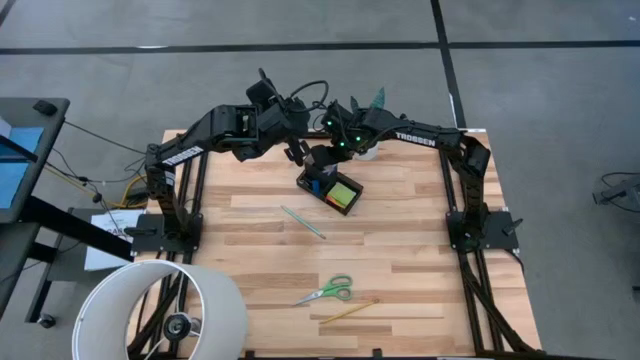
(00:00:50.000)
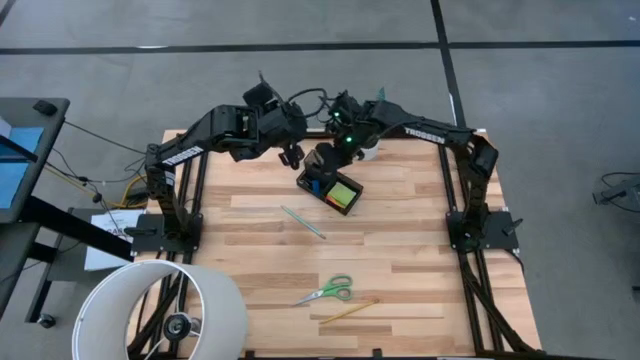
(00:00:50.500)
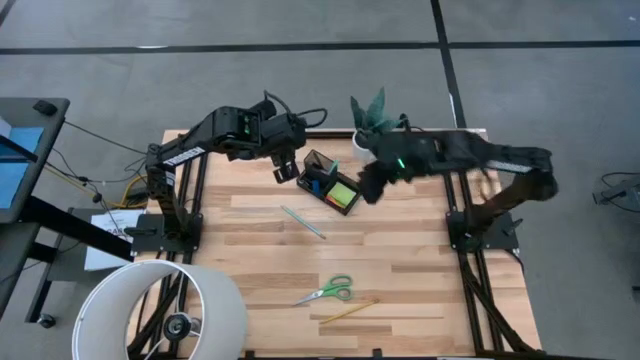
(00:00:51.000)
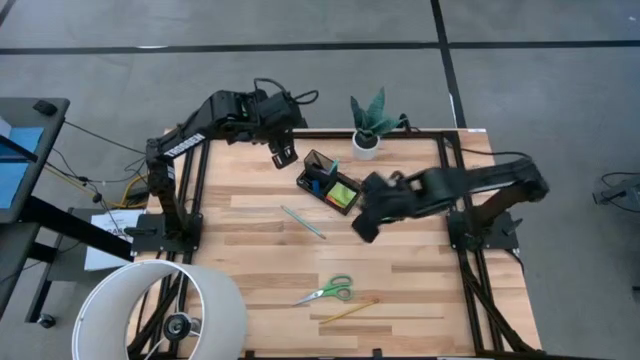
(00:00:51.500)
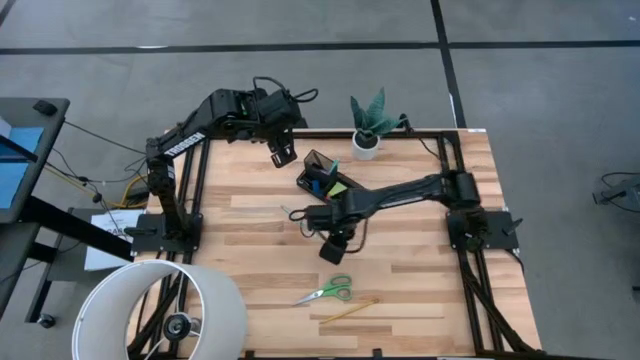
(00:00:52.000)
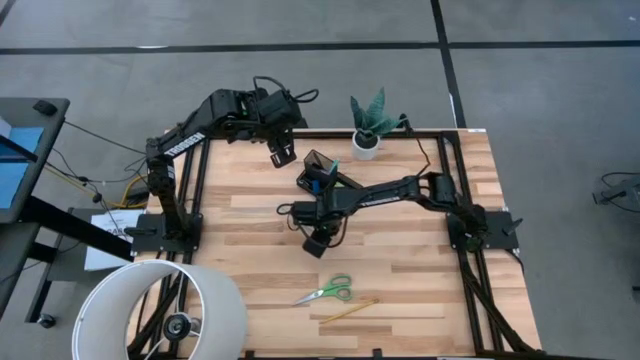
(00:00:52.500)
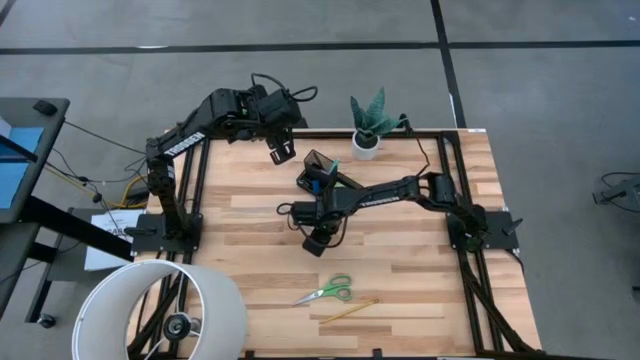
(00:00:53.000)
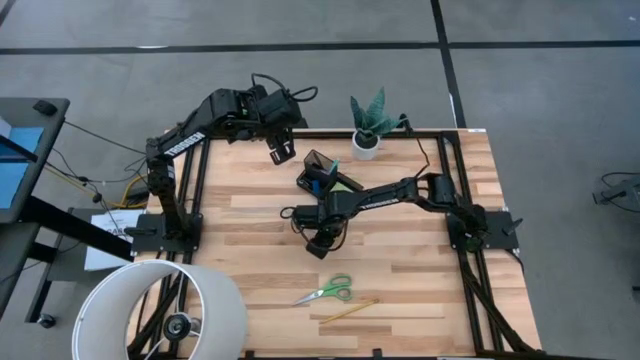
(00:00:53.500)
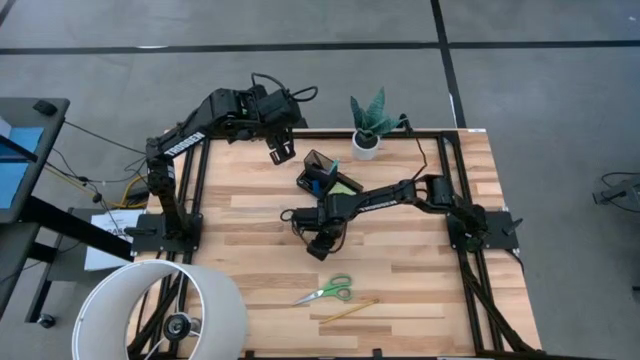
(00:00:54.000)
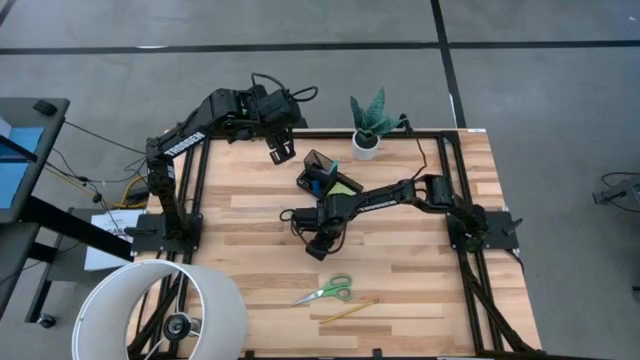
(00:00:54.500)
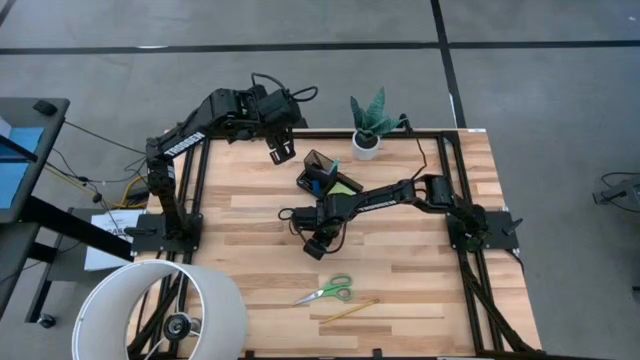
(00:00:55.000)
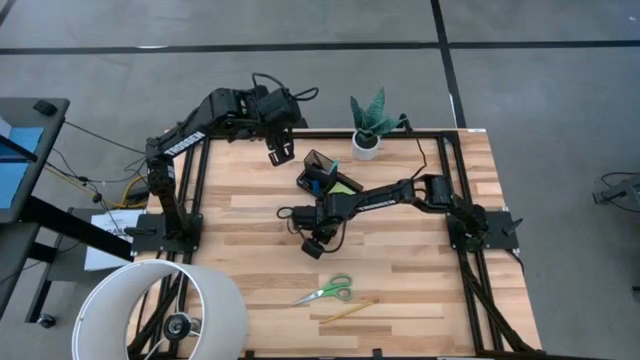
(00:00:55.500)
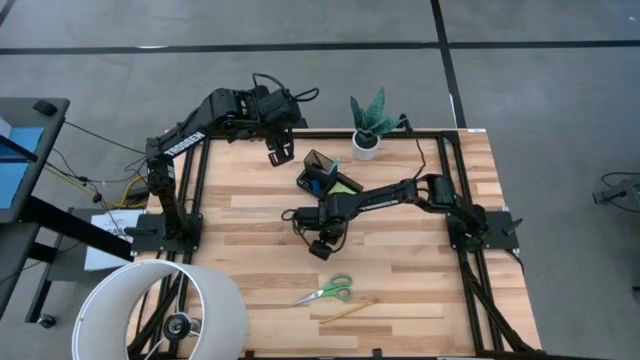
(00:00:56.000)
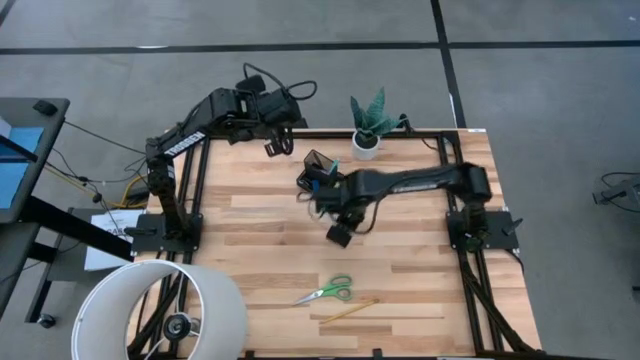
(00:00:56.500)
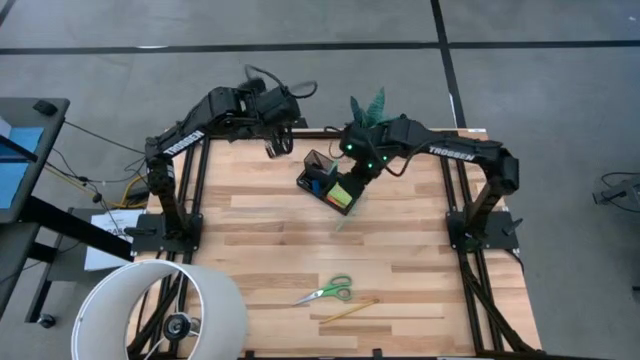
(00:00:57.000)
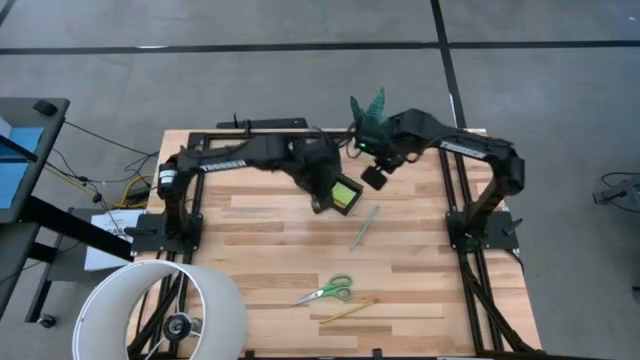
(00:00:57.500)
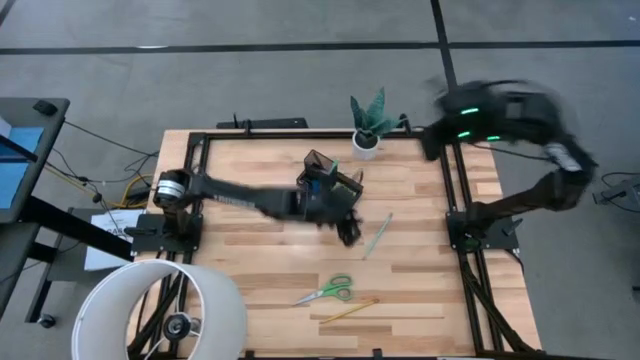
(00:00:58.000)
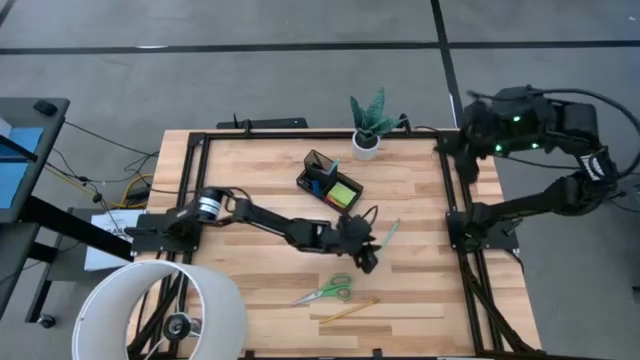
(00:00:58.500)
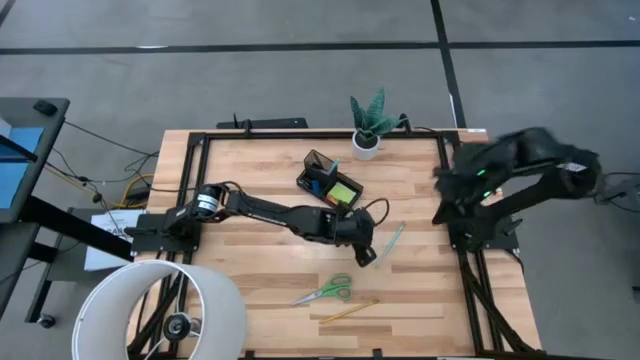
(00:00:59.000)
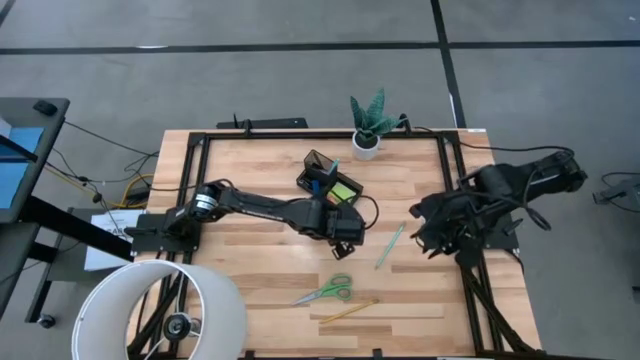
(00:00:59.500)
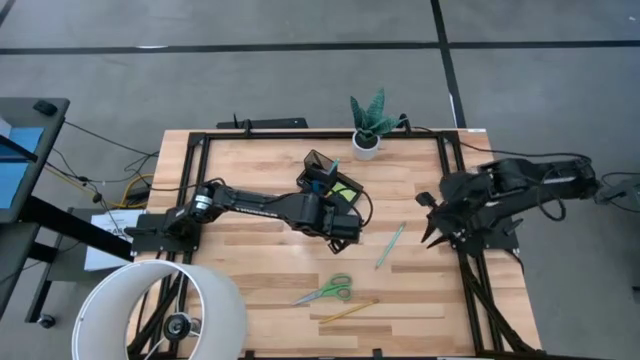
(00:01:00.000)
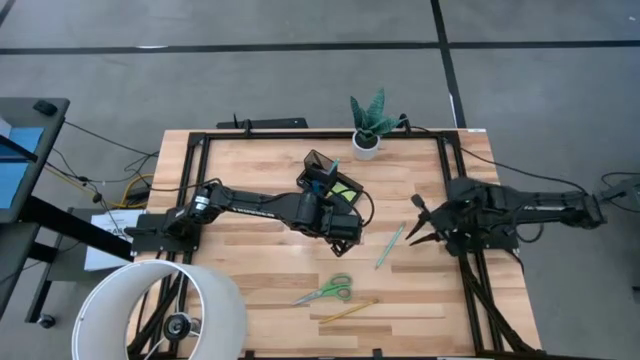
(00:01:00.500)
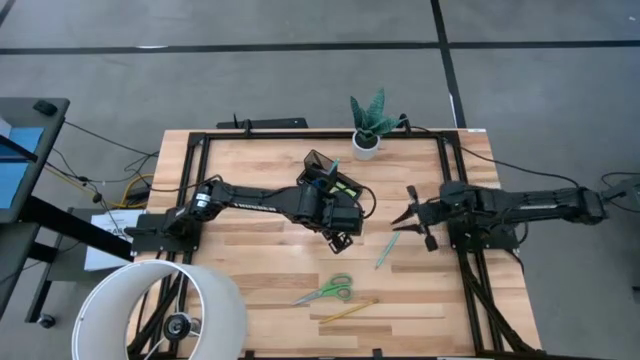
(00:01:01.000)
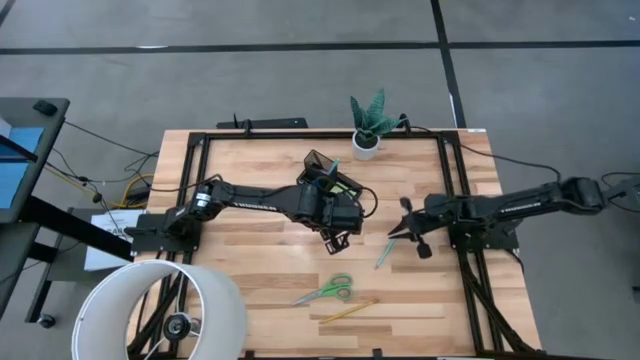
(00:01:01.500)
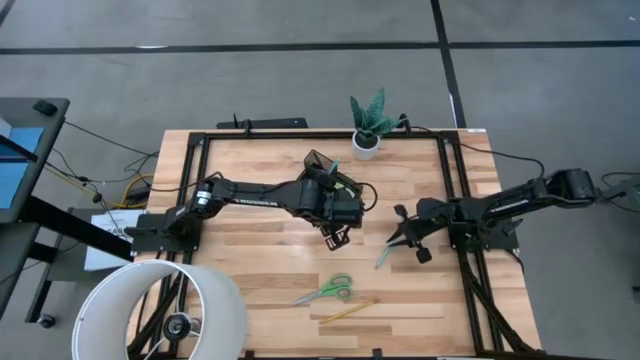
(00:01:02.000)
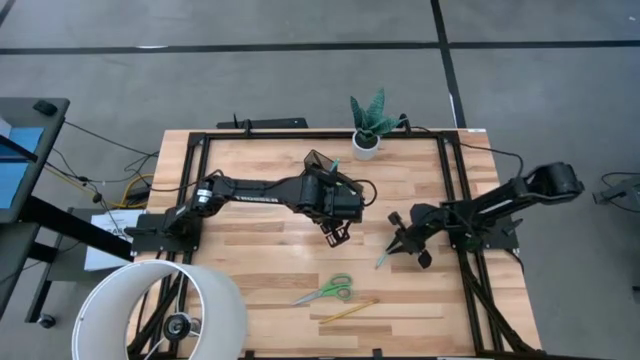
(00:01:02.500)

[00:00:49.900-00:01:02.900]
Task: Pick and place office supplies into organizer
Put the light blue pencil into the black desk organizer

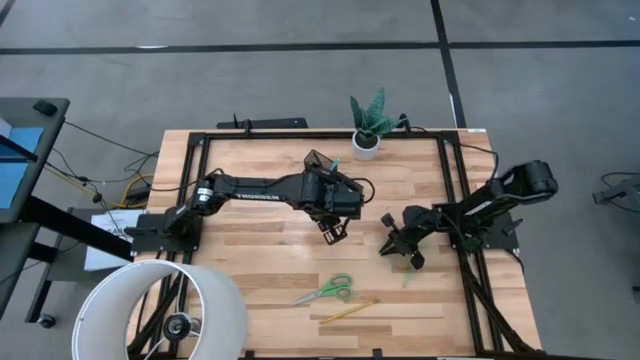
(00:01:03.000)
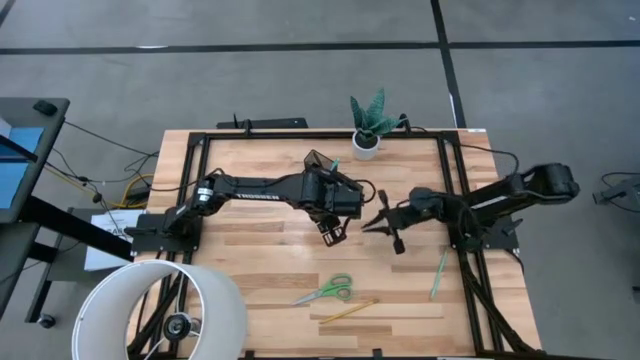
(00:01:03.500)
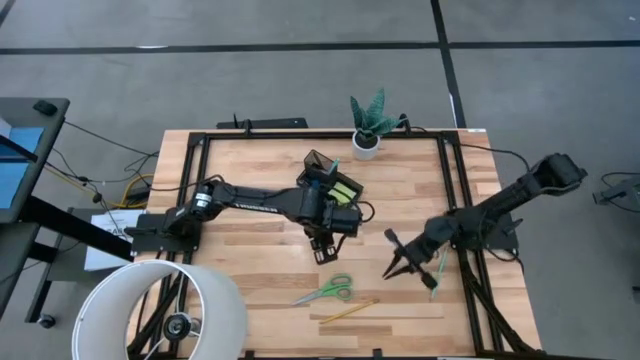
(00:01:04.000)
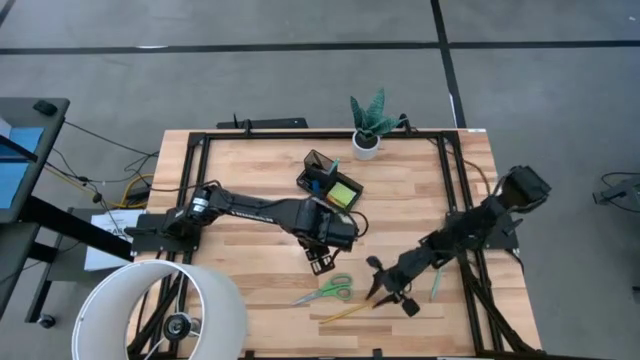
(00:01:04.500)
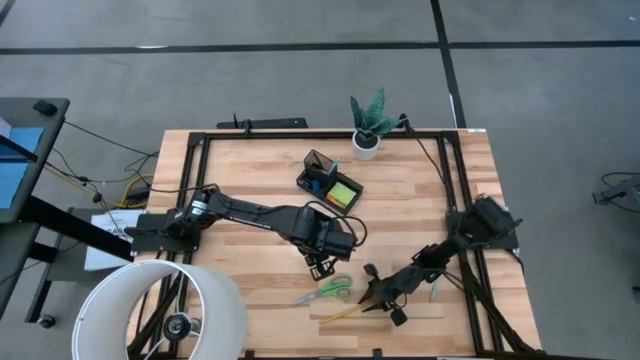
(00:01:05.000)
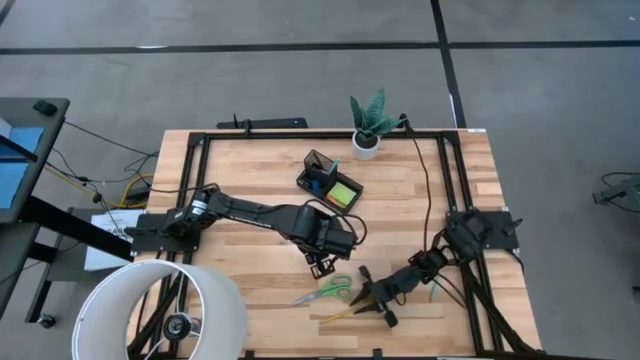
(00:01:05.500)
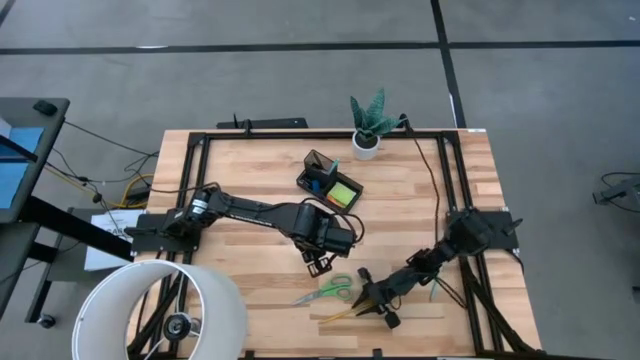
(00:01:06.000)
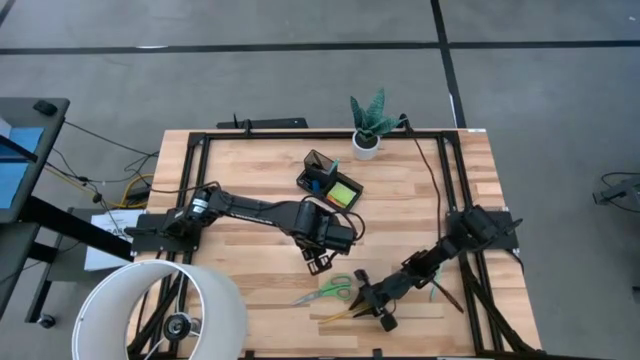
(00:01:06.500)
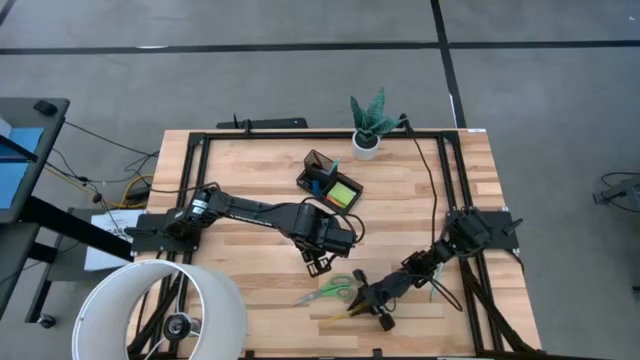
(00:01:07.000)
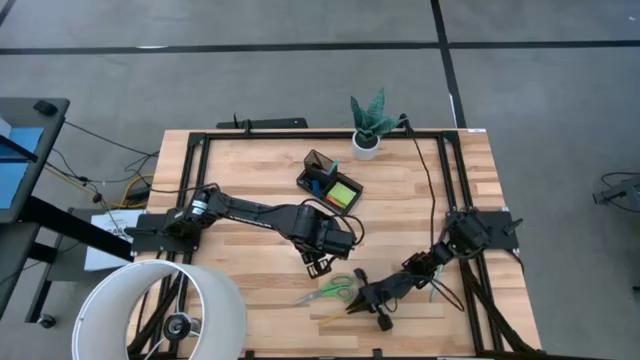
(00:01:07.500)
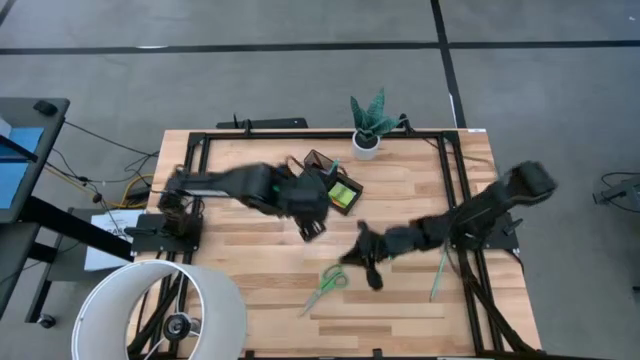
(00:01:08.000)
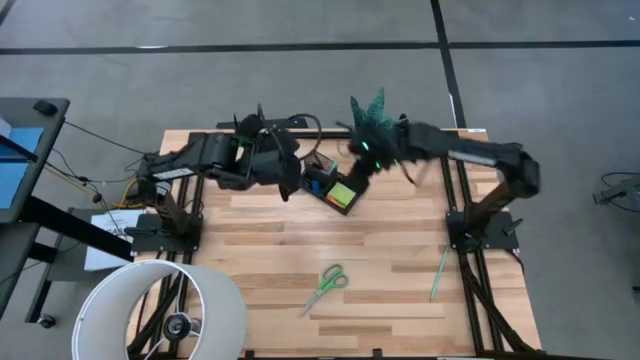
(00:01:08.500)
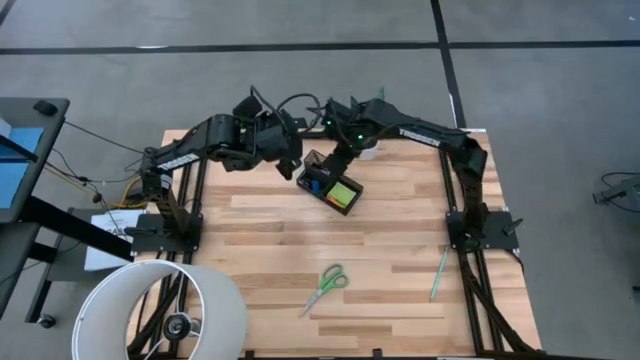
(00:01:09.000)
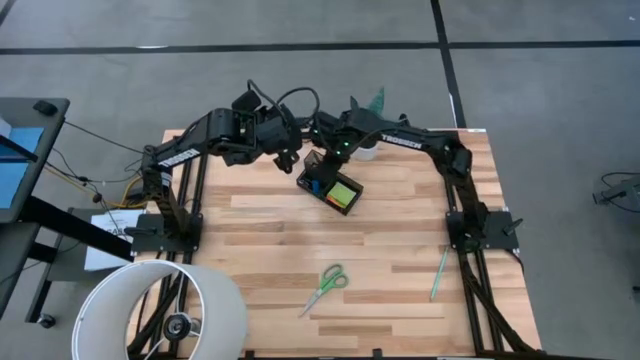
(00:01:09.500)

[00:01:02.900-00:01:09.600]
Put the yellow pencil into the black desk organizer
